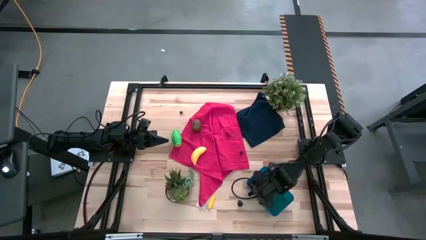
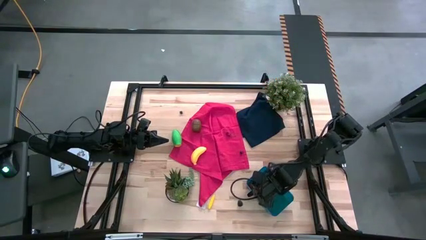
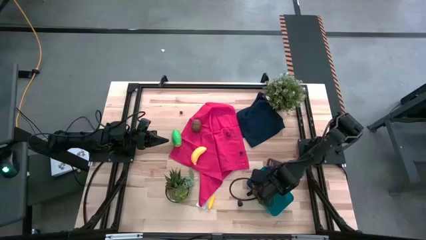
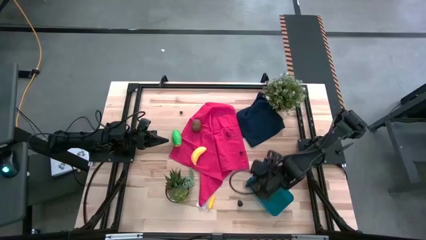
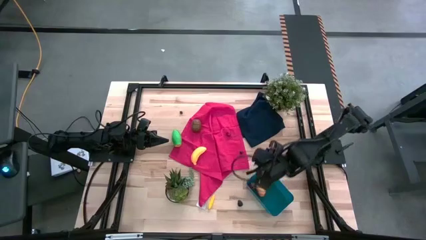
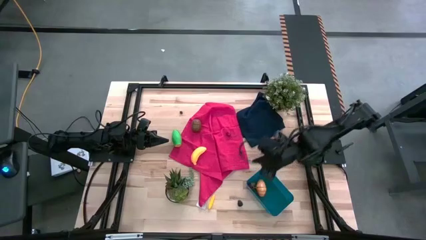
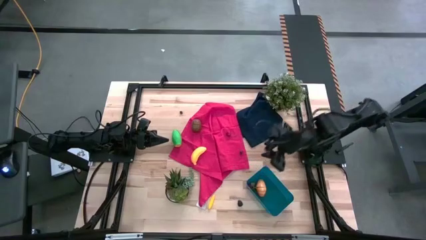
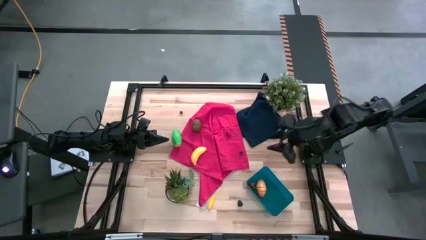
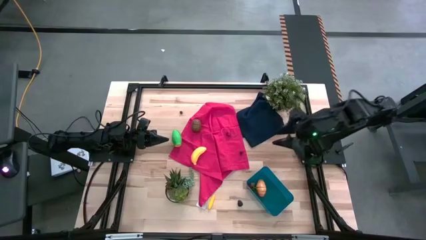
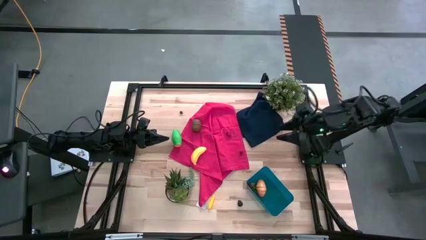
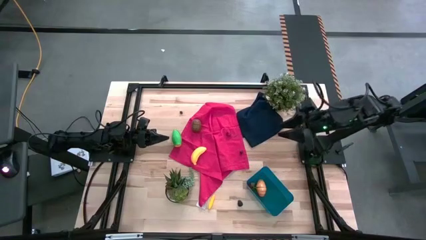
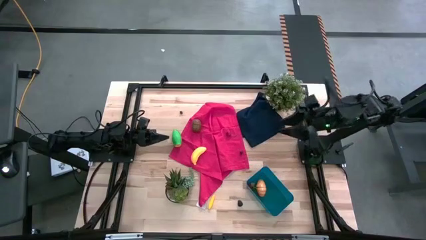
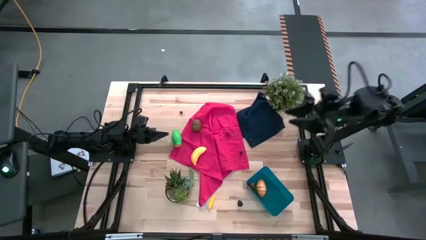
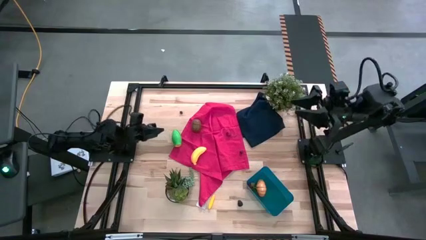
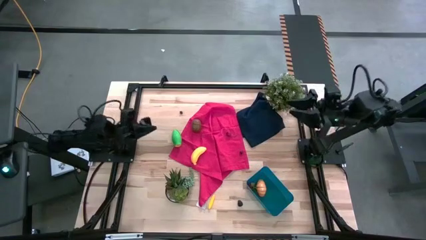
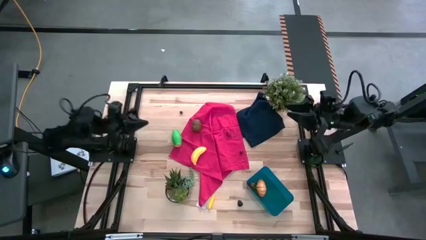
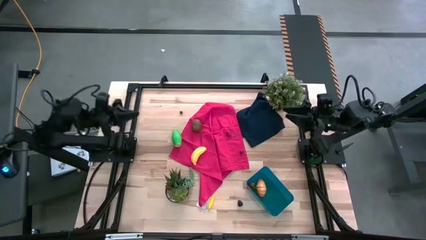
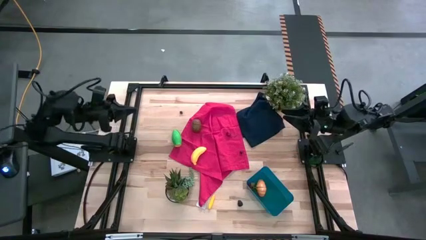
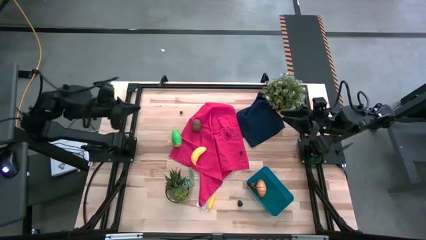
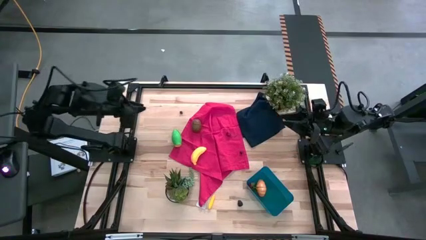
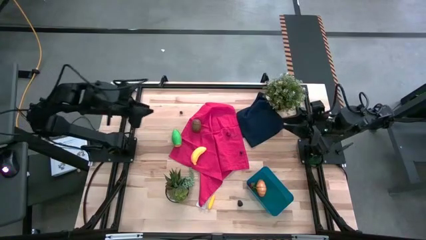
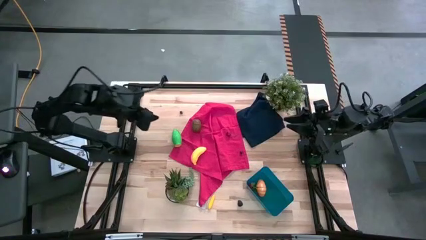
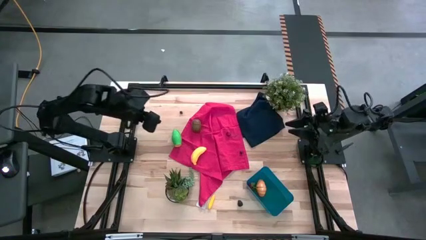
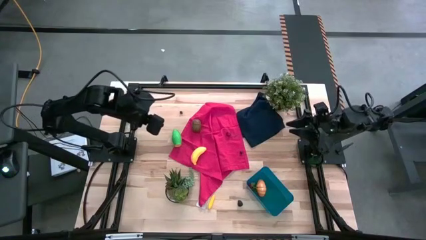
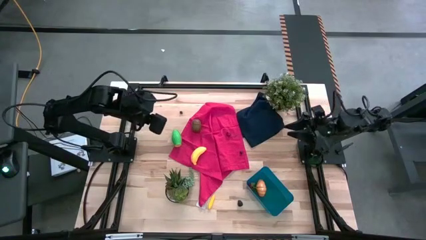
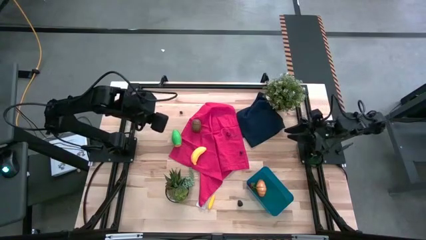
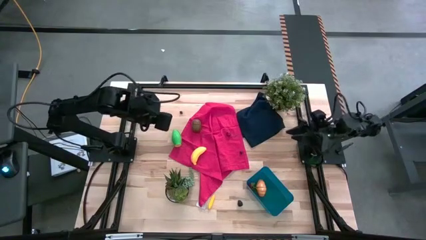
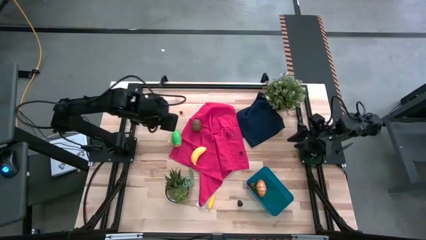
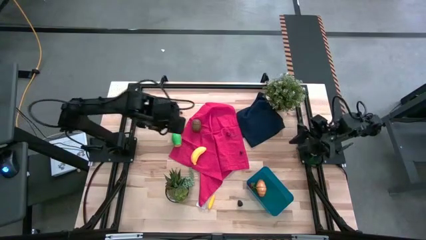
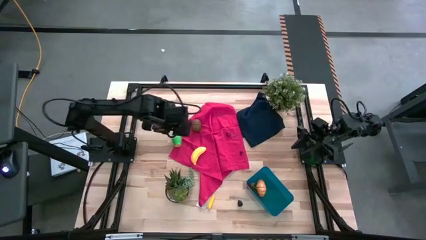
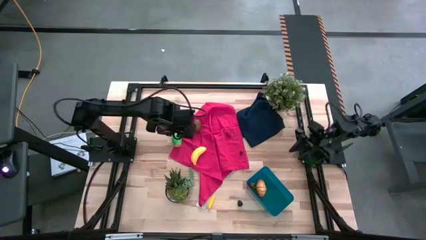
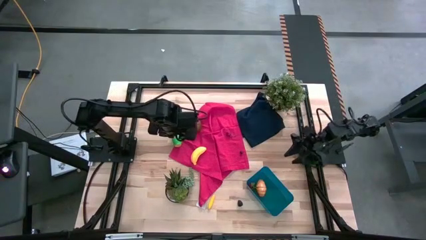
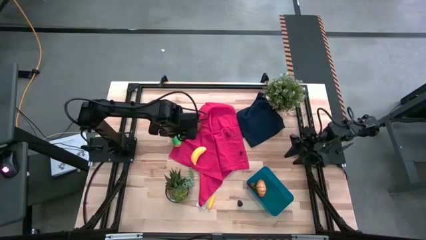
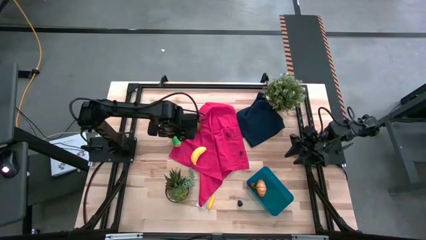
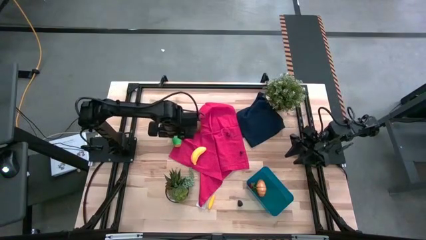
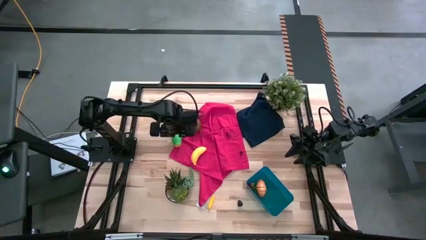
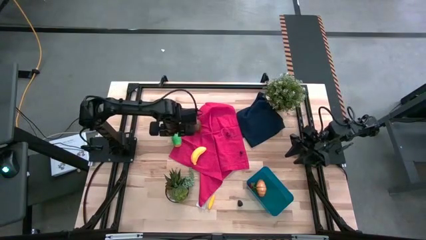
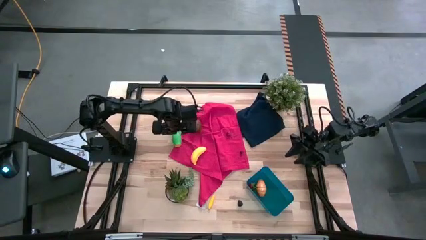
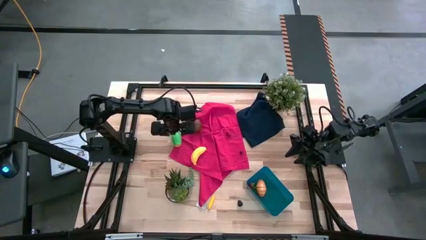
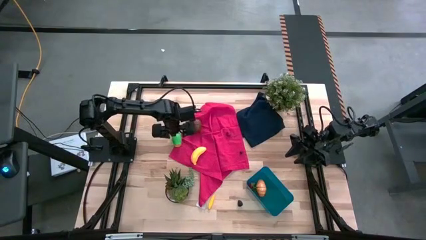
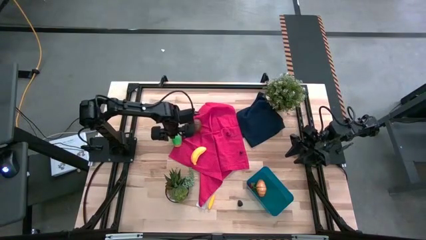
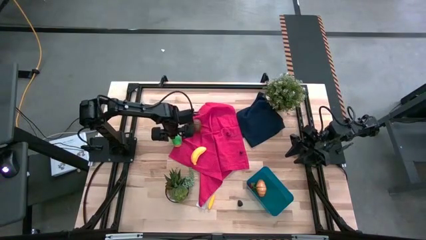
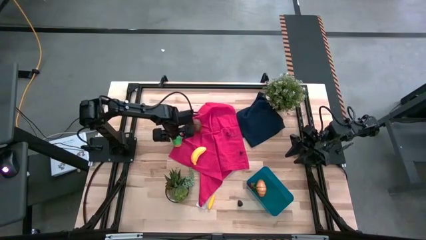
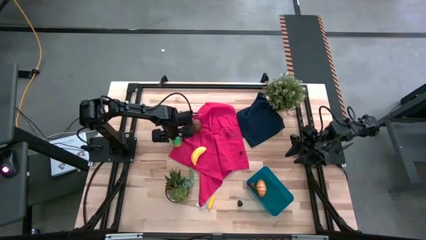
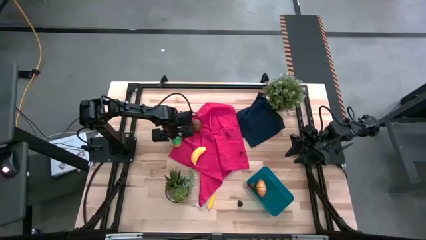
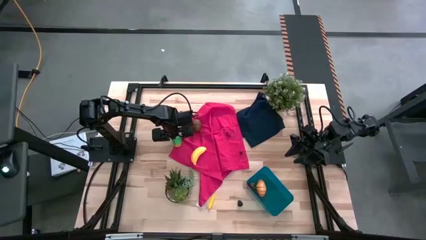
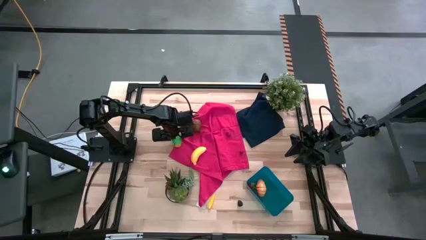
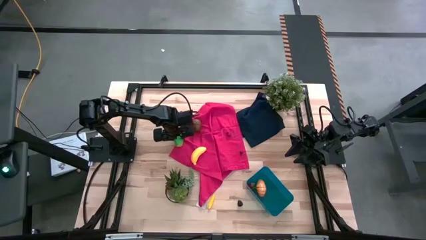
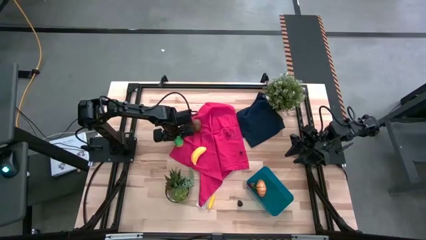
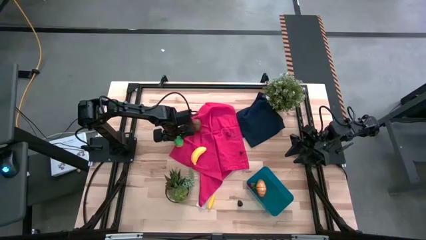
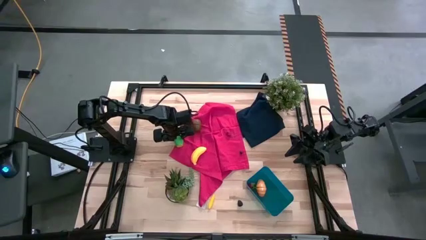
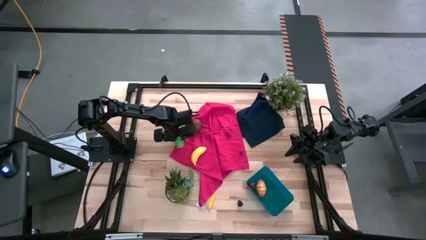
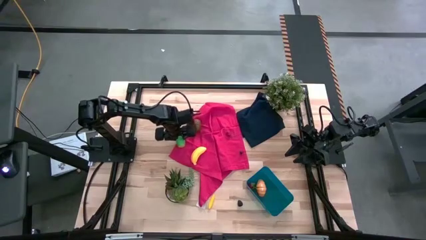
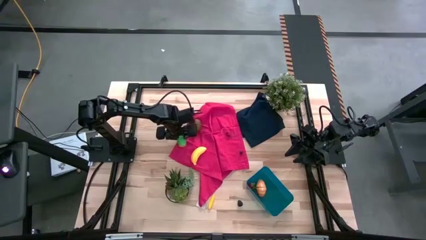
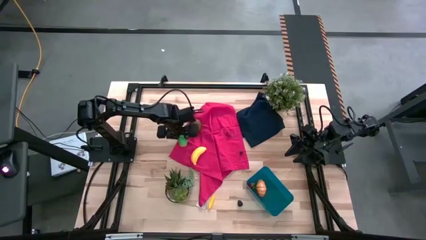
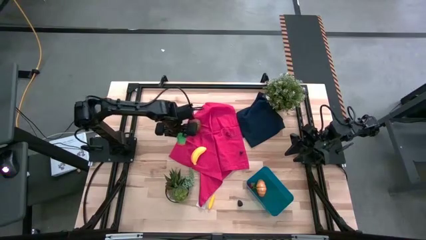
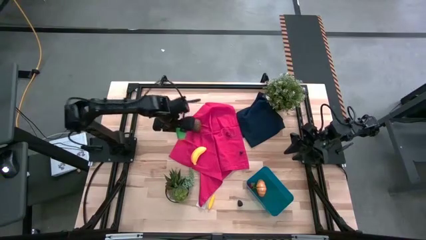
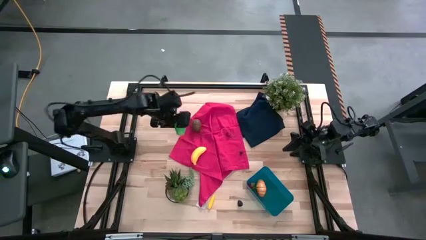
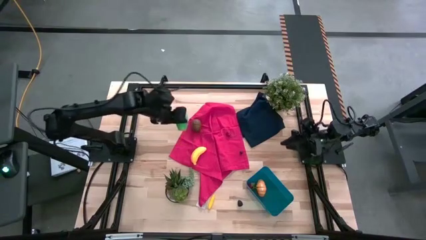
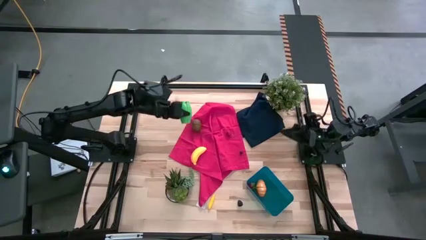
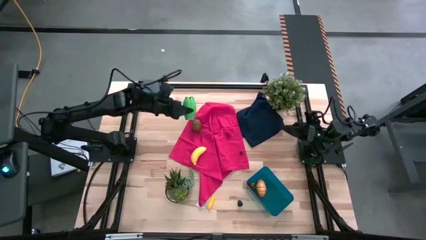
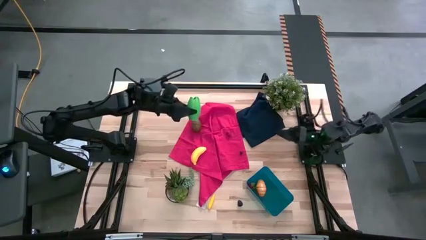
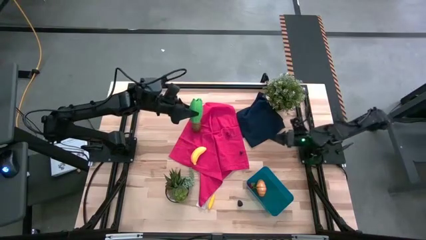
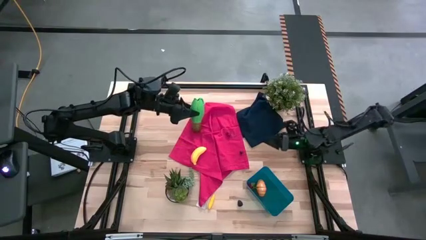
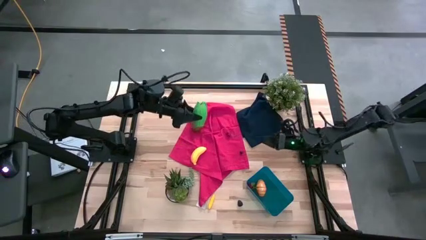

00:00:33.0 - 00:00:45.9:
Task: Pick and placing Produce into tupperware
Put the green corn into the blue bin
